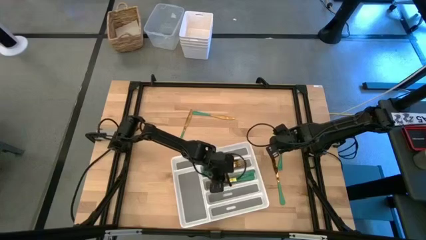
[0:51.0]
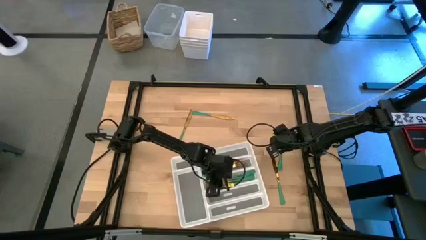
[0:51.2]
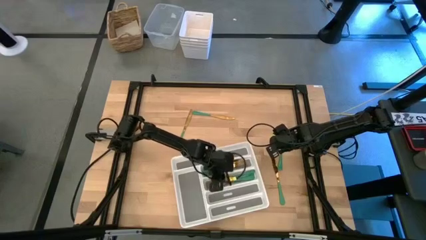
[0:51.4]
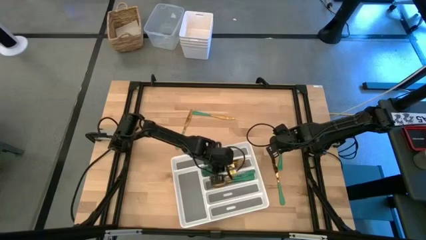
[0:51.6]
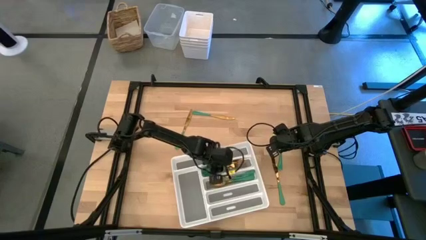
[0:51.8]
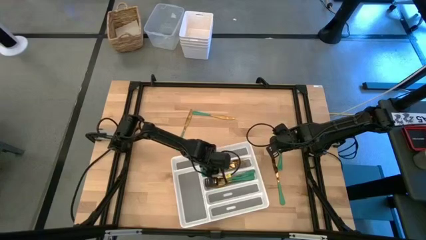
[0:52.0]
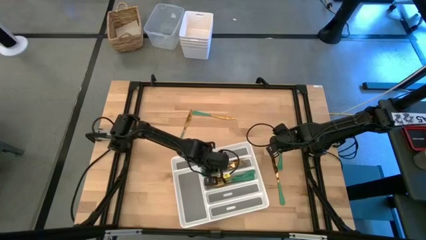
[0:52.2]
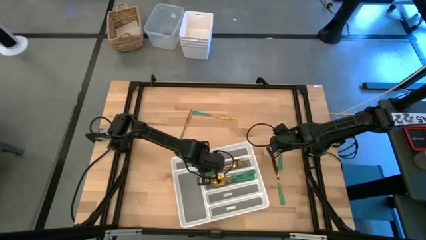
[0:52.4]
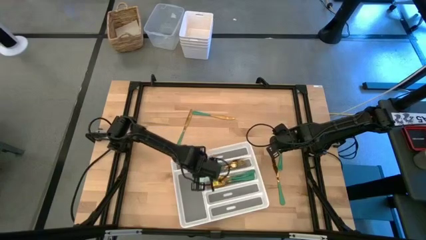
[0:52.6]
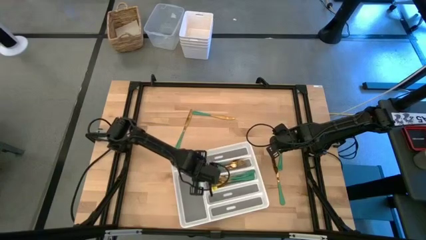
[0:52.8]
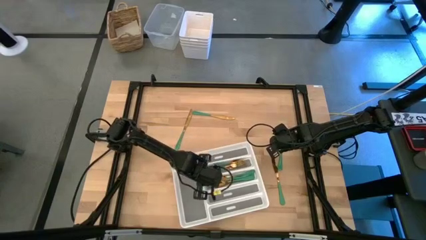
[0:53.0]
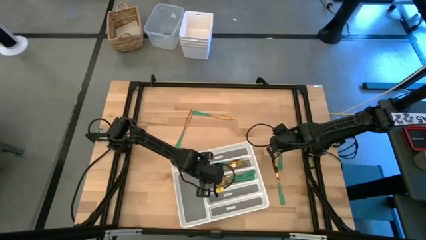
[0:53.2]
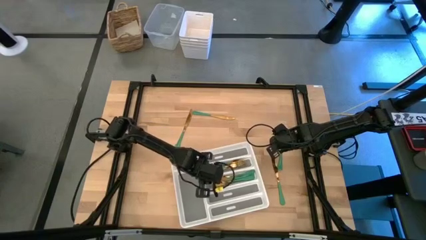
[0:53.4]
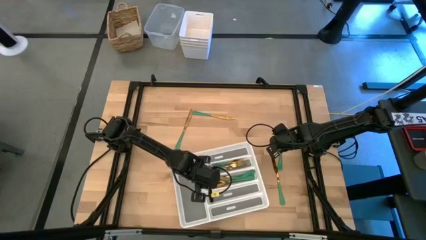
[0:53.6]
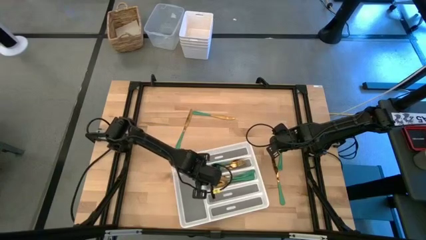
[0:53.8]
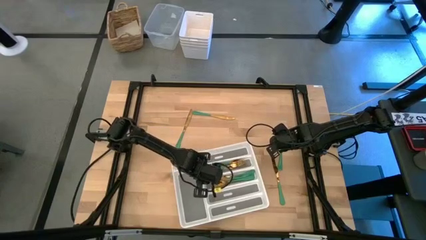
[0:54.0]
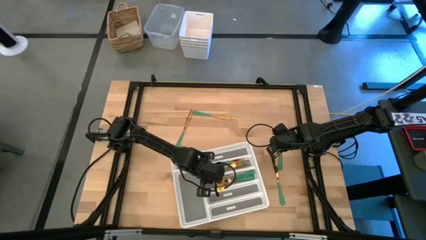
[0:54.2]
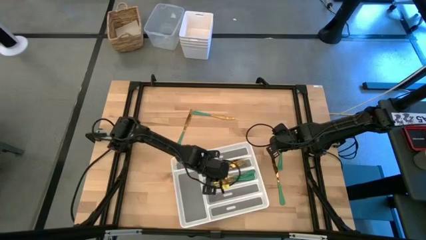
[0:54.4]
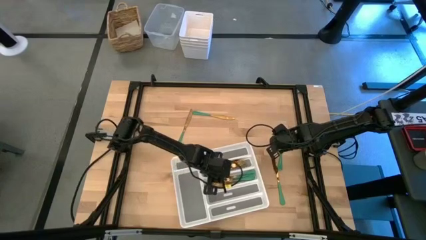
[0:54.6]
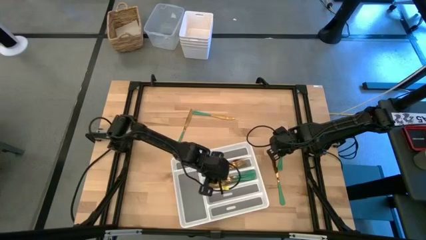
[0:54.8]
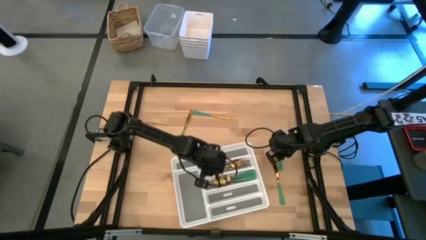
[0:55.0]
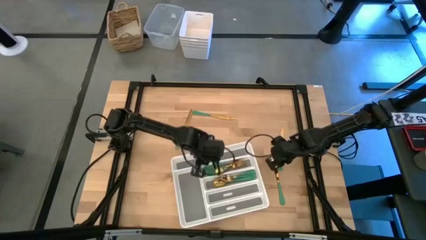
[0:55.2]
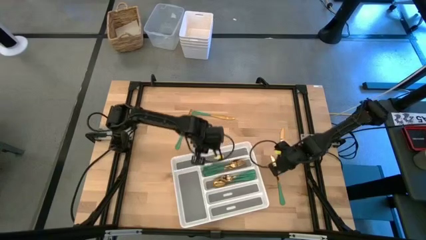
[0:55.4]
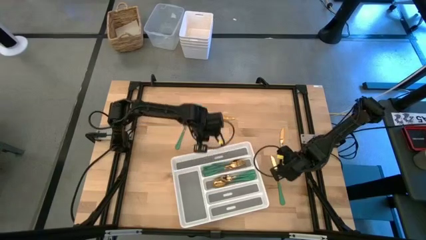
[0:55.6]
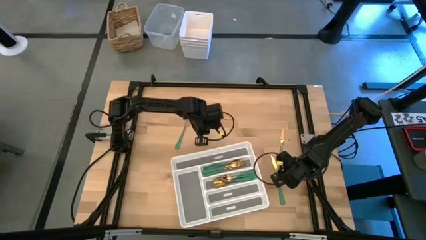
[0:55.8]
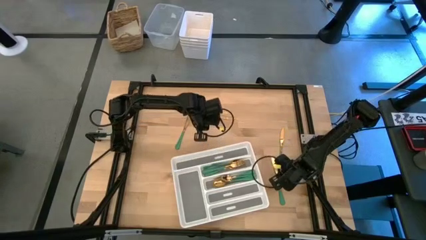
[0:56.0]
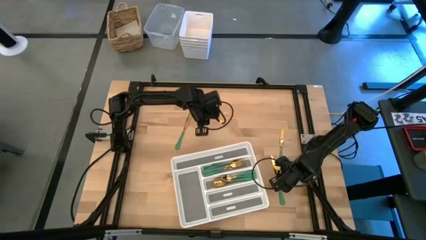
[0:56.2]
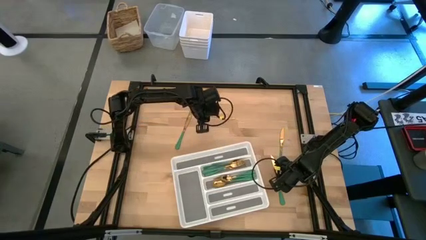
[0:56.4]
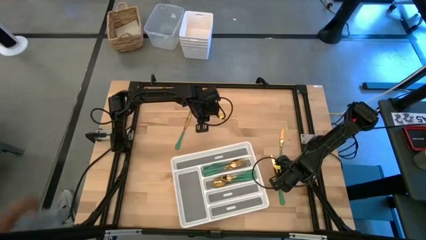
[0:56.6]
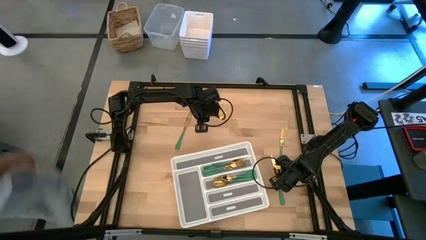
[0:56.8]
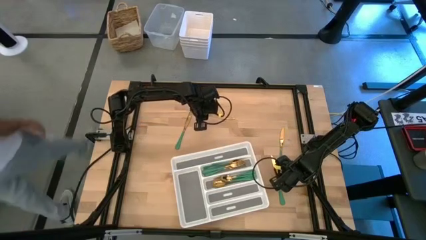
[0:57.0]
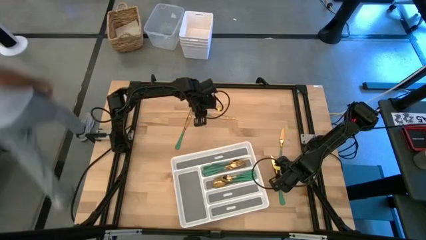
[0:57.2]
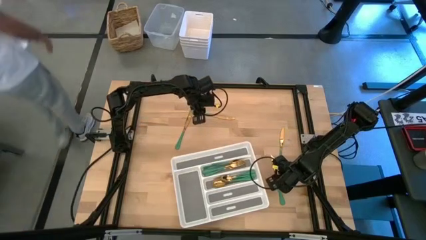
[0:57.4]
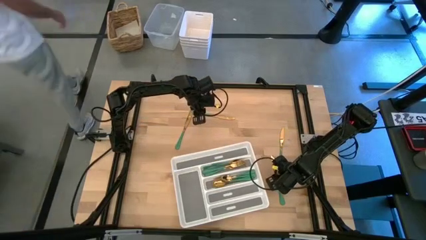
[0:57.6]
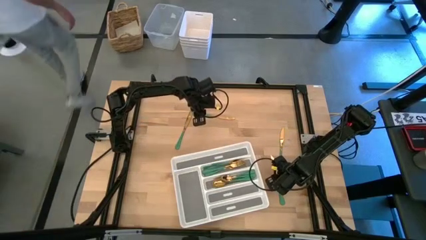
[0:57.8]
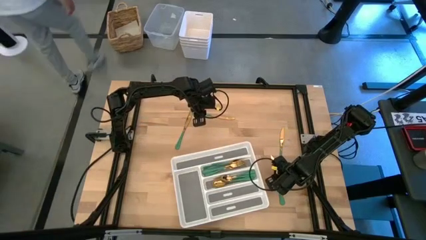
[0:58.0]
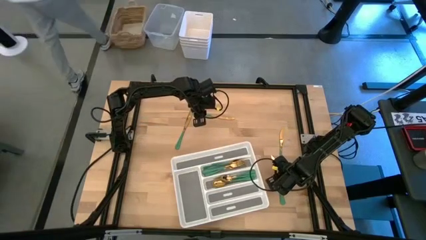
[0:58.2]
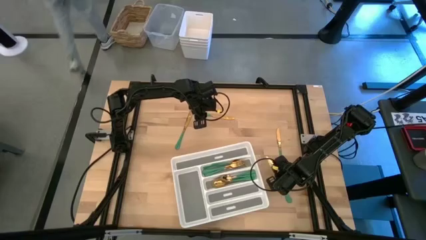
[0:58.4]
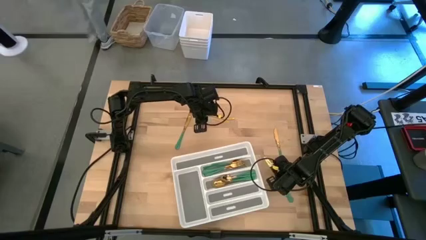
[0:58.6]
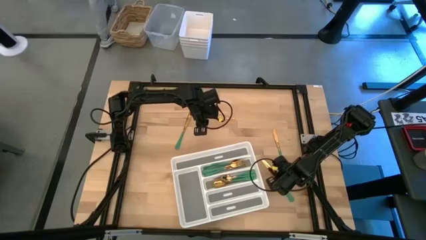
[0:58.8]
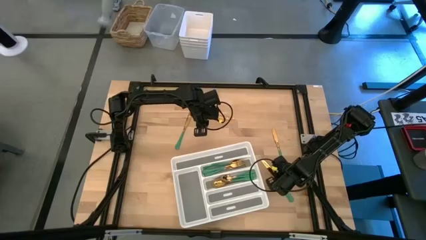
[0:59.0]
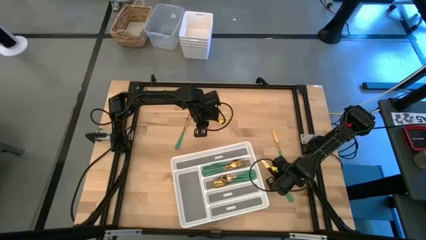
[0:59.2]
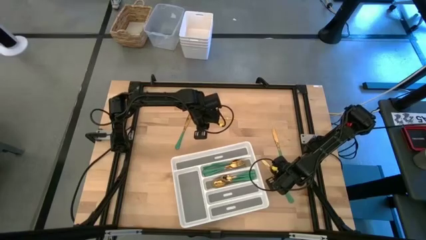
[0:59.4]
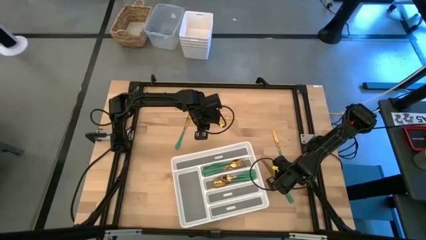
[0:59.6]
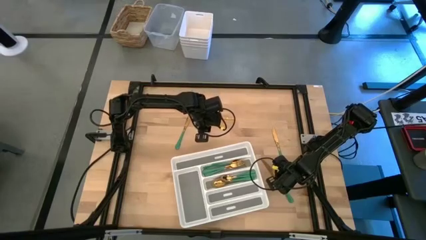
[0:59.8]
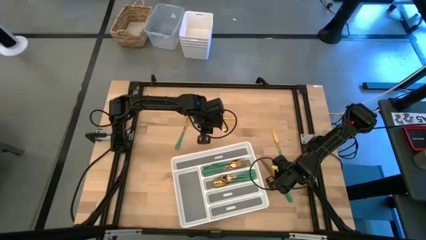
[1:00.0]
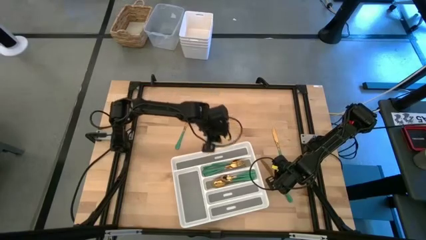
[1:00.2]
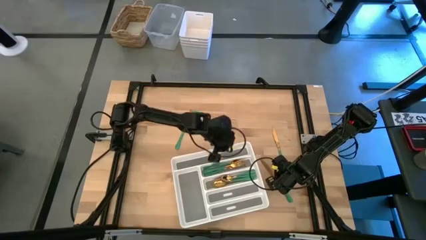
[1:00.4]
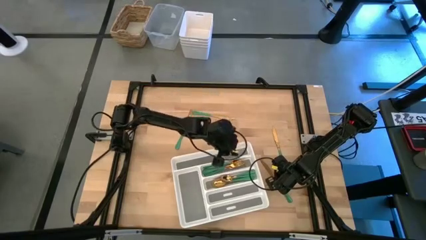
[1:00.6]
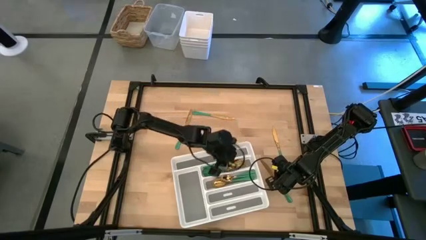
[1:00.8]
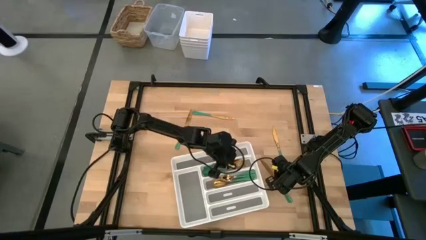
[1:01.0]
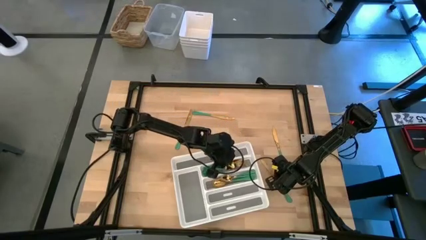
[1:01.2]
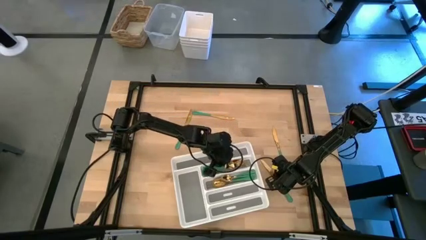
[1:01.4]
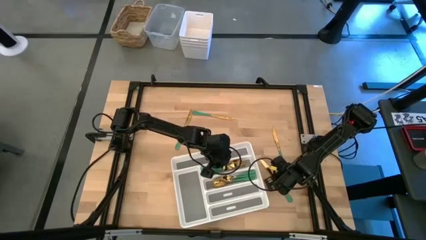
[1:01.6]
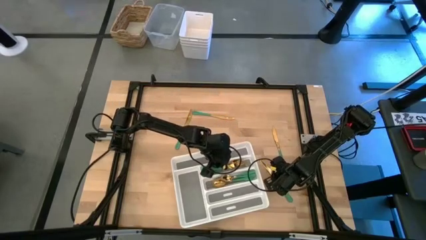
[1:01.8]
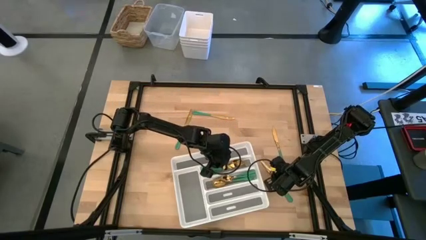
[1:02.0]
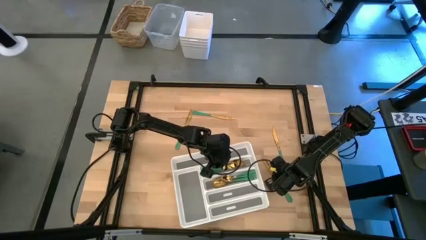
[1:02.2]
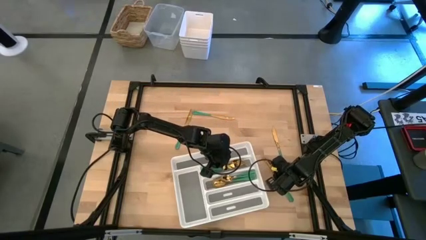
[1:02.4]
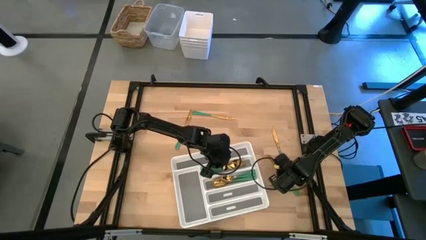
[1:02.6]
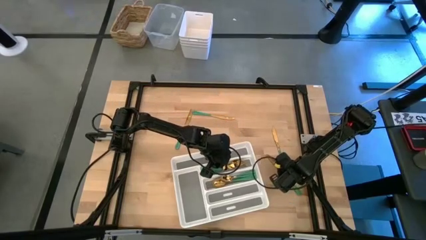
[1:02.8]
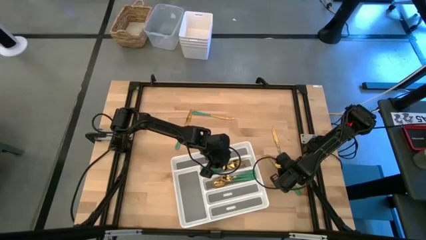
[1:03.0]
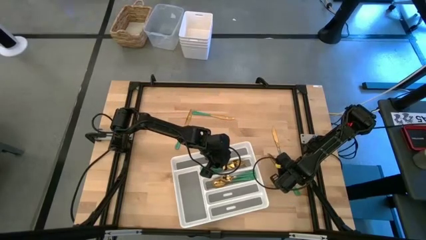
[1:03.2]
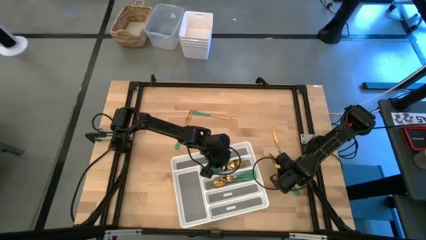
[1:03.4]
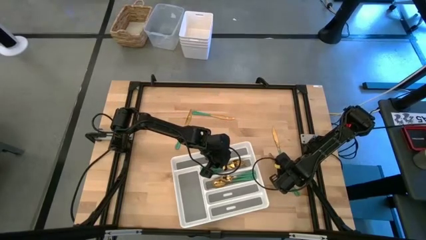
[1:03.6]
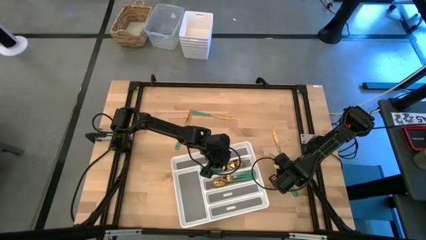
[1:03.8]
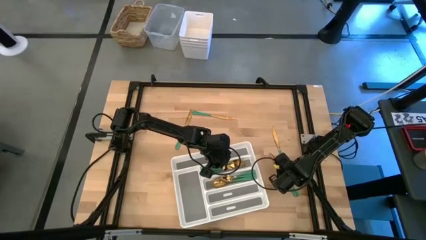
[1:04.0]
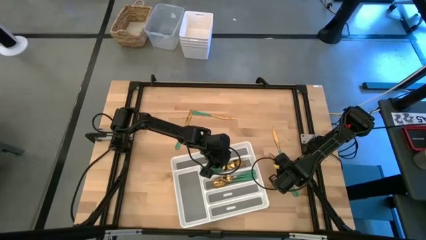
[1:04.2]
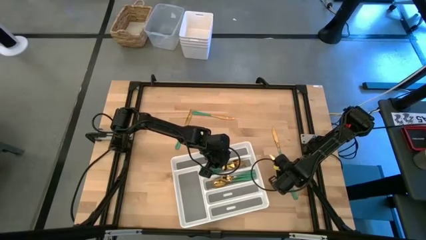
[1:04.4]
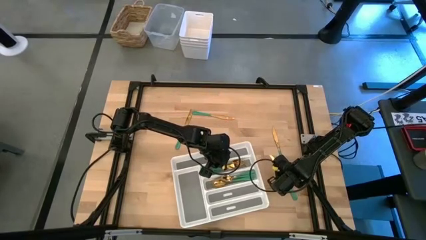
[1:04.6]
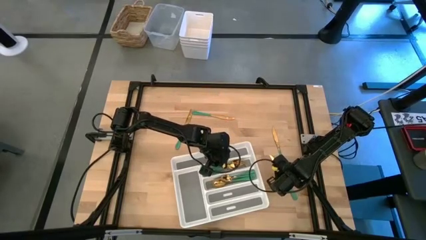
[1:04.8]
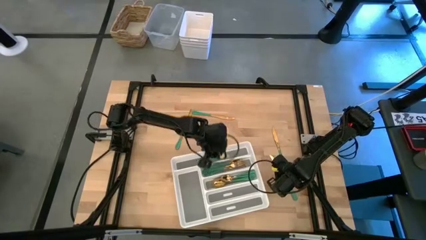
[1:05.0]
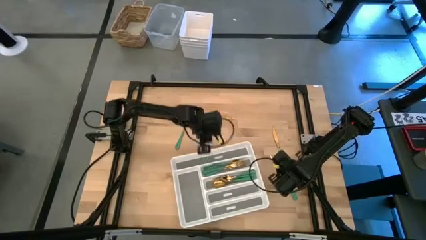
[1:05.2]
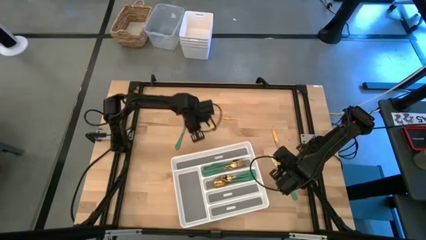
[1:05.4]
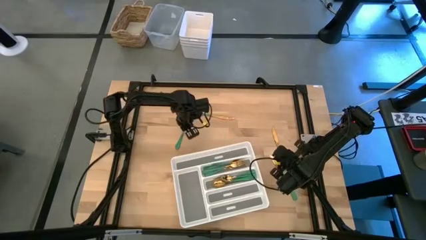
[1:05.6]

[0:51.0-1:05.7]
Task: Sort silverware
Put the green knife into the white silverware tray

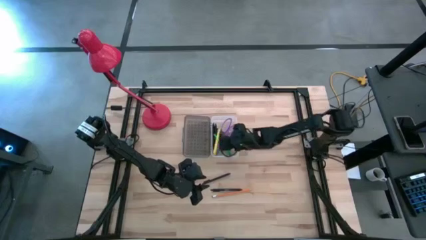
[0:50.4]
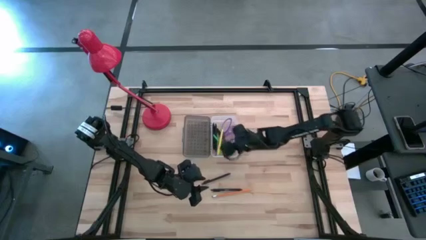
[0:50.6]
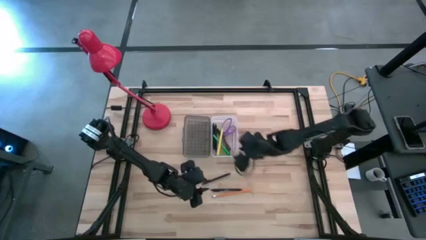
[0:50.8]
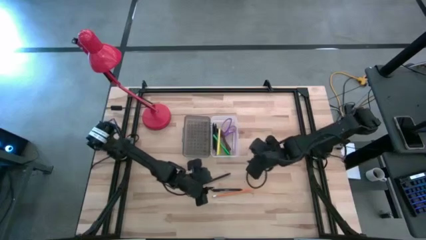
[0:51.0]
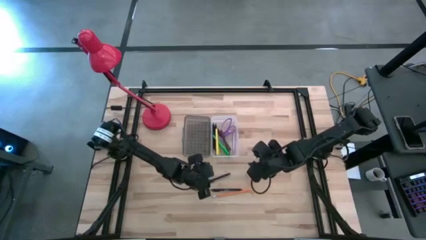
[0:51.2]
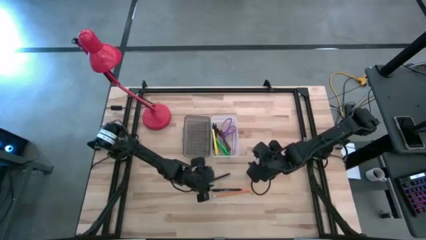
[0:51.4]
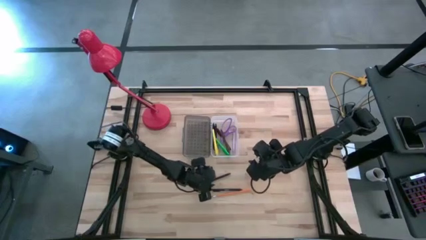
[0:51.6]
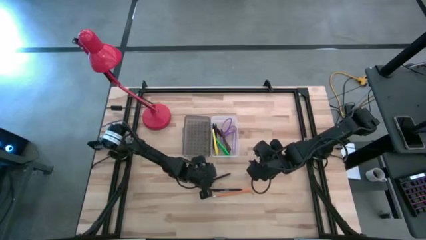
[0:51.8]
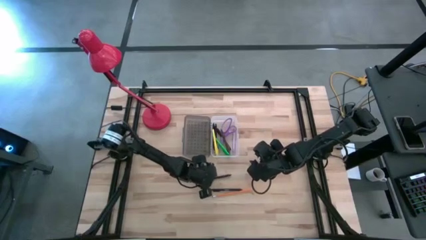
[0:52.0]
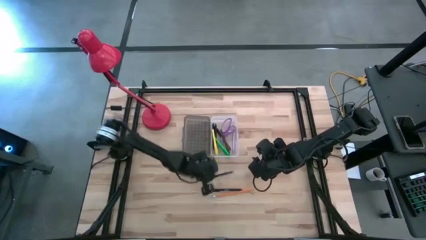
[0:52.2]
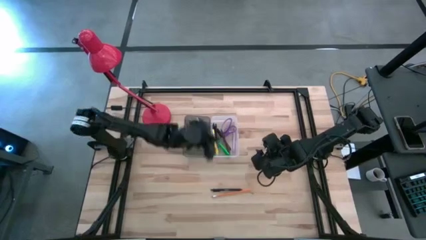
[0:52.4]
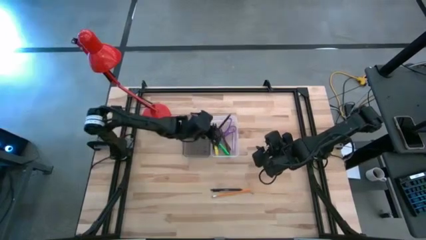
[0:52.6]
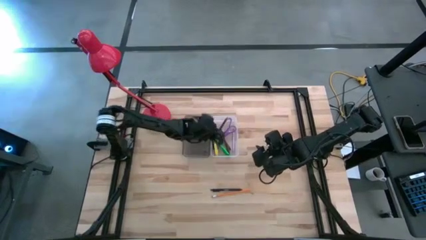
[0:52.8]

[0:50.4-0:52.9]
Task: Pick & place school supplies into a supply box
Put the top black pen into the supply box

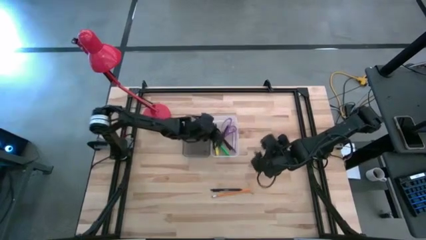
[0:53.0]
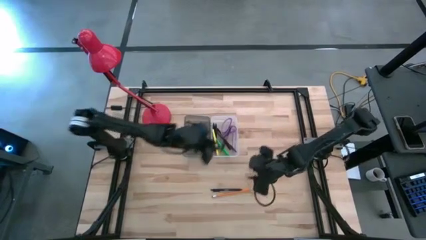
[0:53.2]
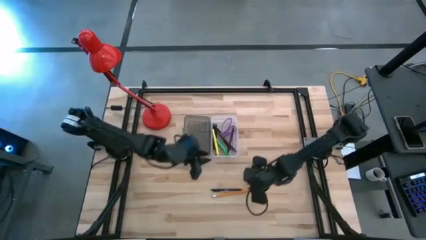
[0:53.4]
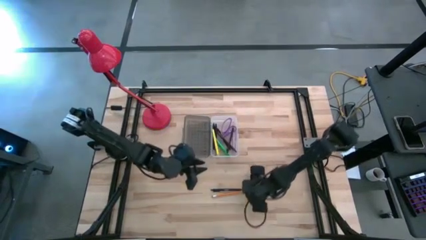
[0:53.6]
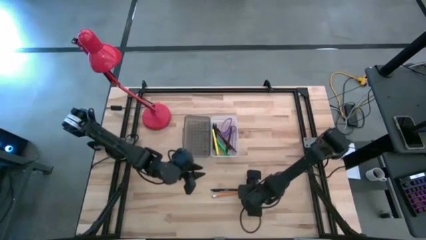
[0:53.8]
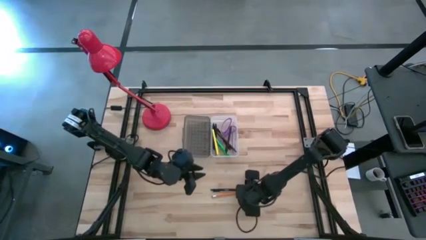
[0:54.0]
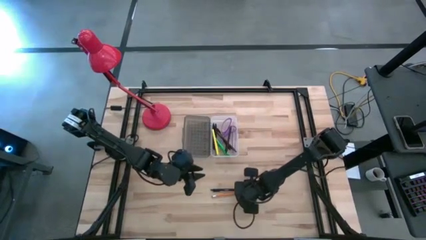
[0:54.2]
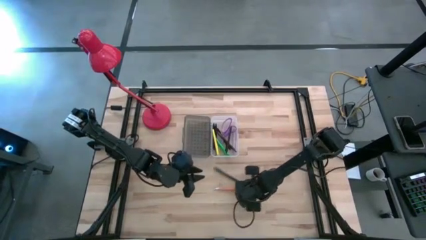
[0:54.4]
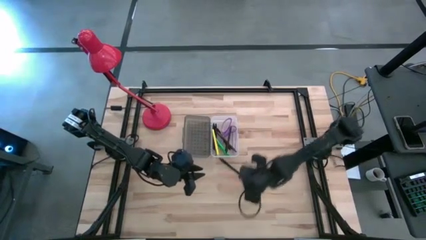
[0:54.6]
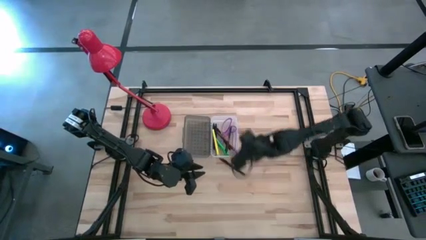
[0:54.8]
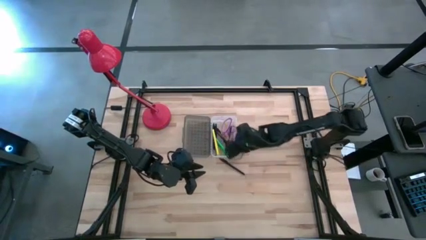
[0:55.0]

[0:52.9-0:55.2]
Put the yellow pencil into the supply box
